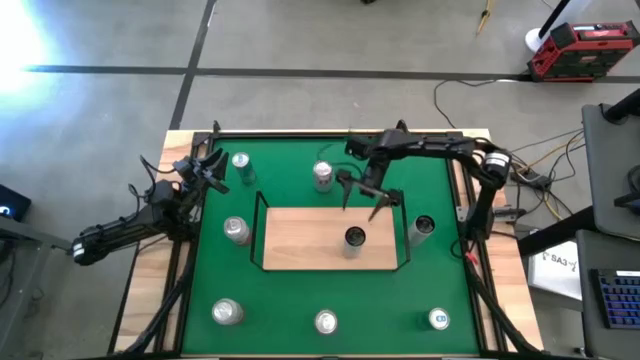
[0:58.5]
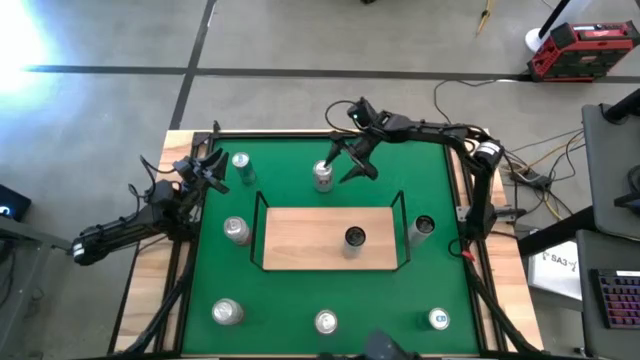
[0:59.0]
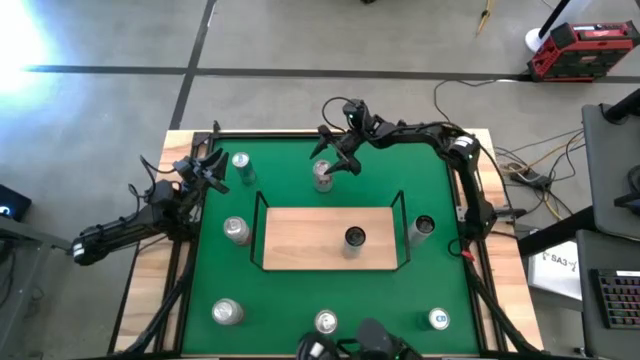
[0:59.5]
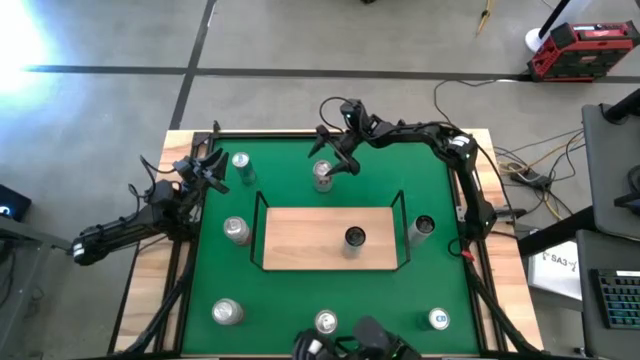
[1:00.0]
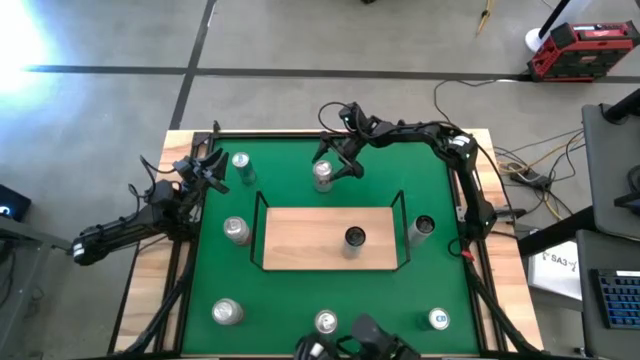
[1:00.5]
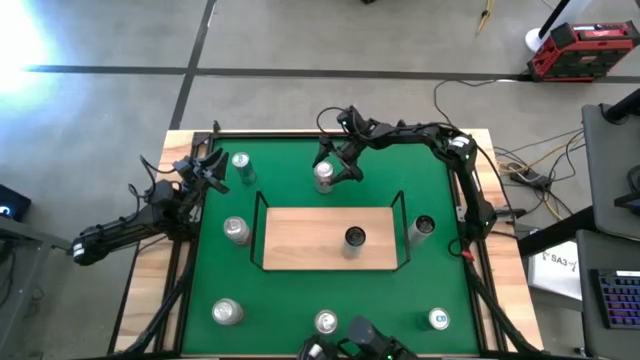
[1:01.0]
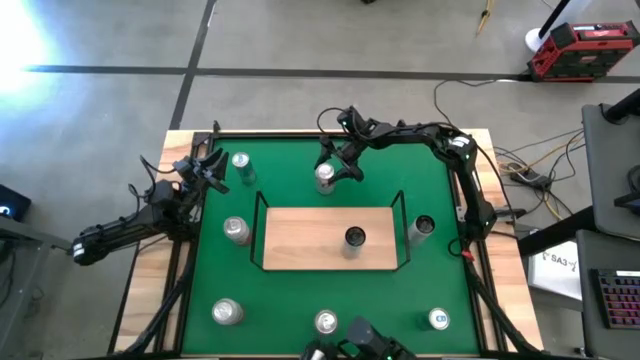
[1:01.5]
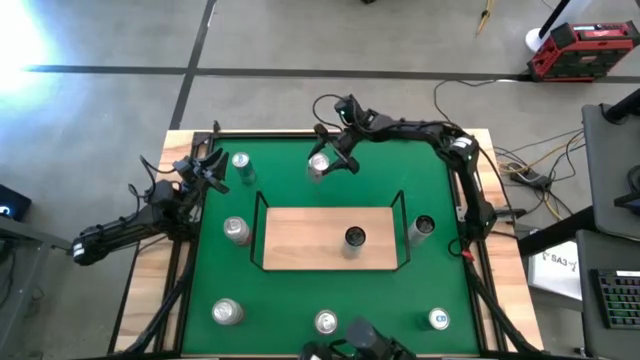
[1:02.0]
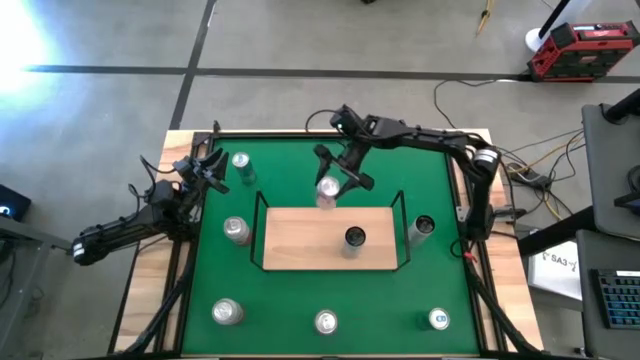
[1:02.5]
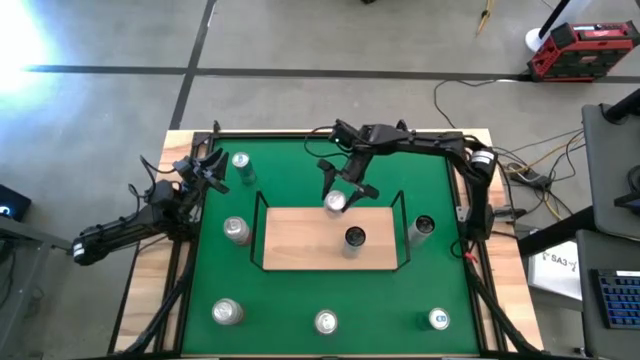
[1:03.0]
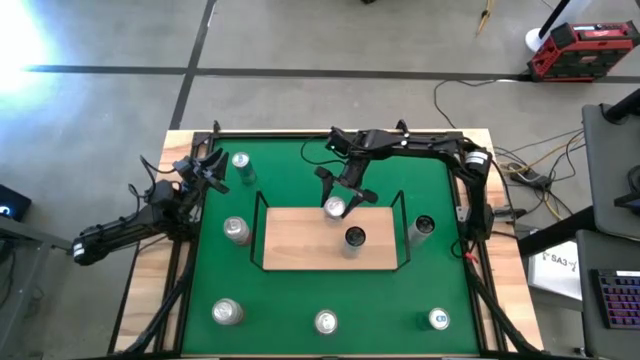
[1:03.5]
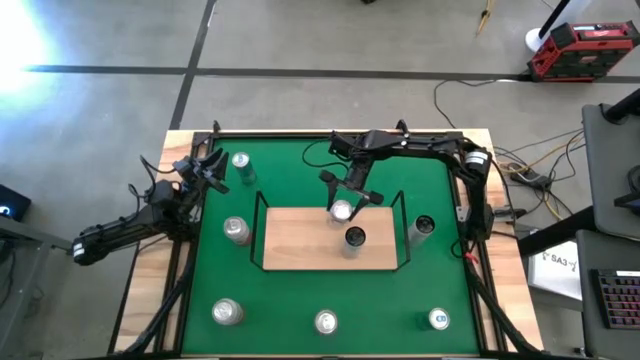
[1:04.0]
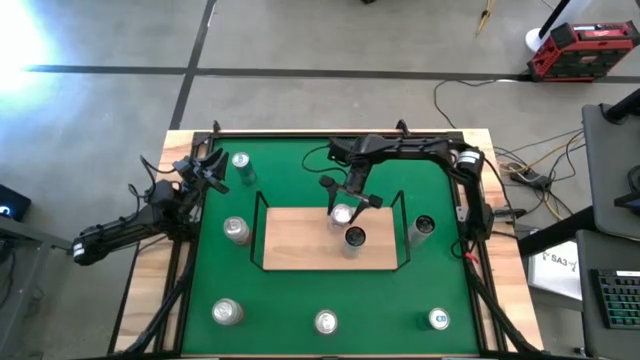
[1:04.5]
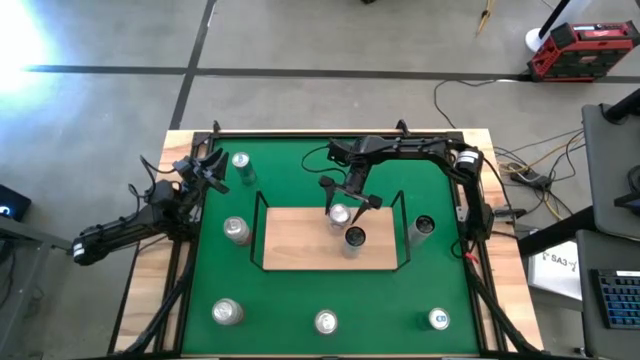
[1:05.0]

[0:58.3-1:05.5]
Task: Place canned beverage on shelf
Put the top red and silver soda can on the shelf

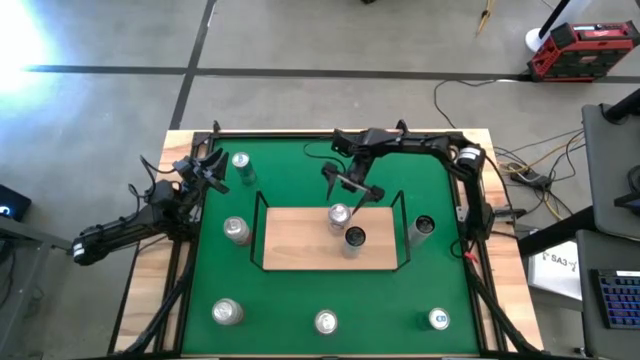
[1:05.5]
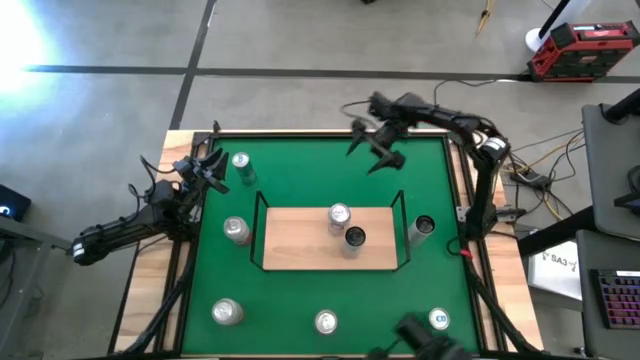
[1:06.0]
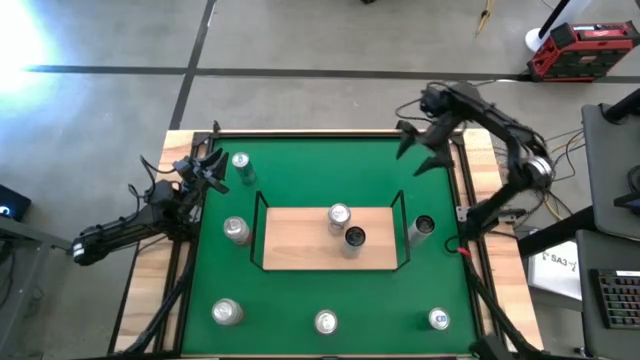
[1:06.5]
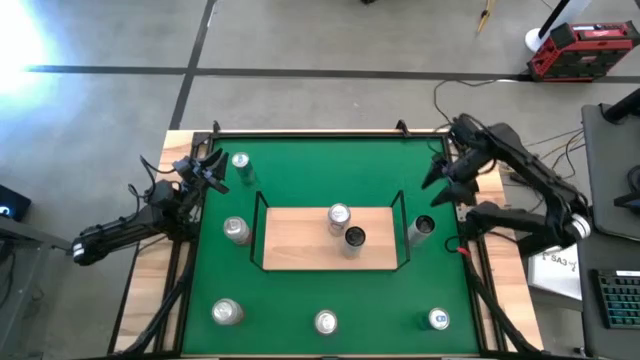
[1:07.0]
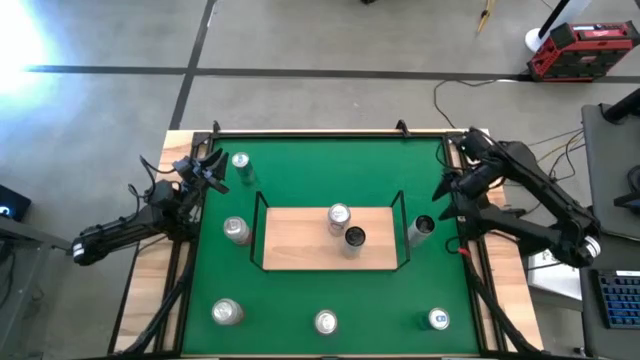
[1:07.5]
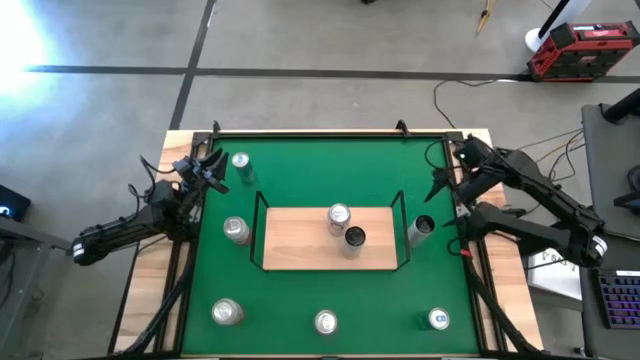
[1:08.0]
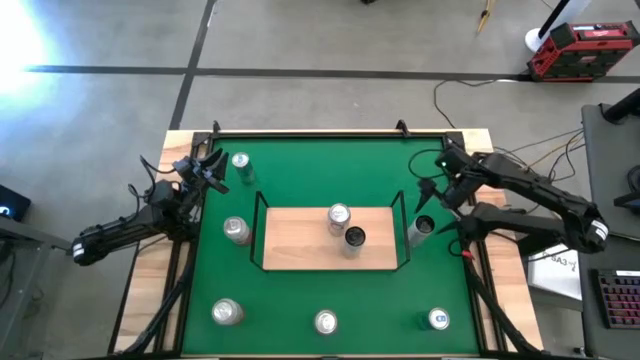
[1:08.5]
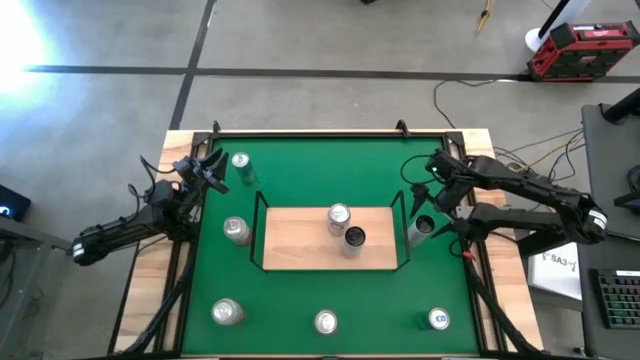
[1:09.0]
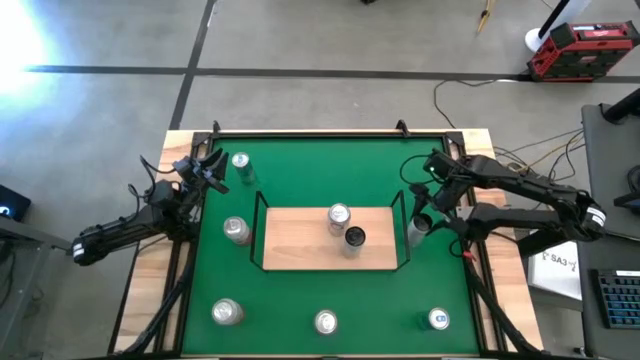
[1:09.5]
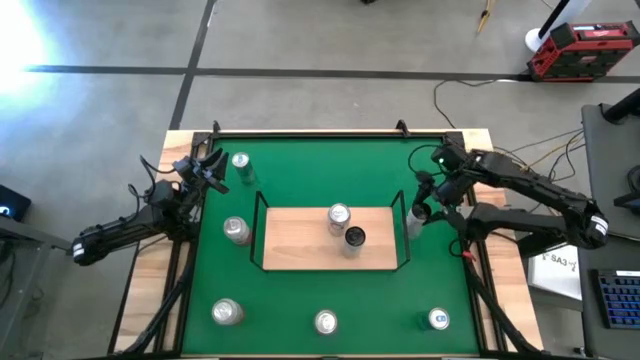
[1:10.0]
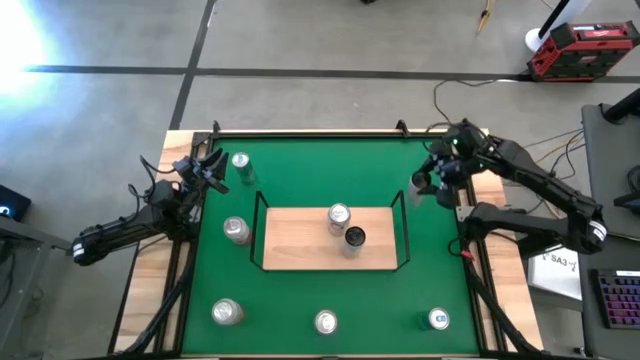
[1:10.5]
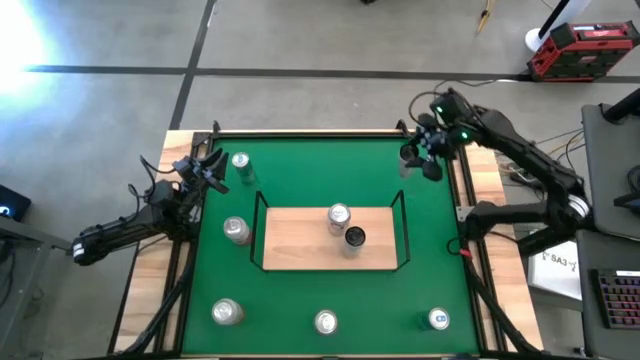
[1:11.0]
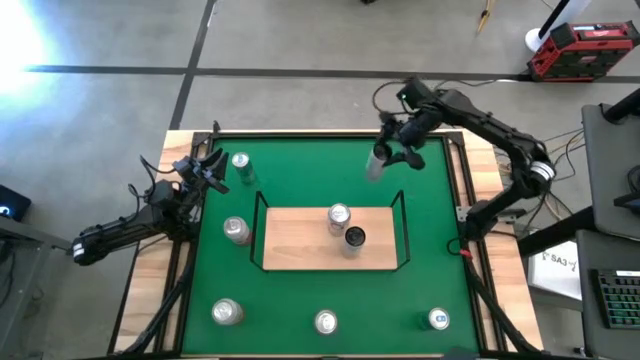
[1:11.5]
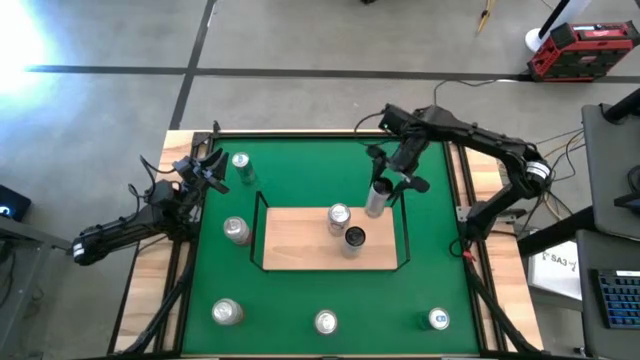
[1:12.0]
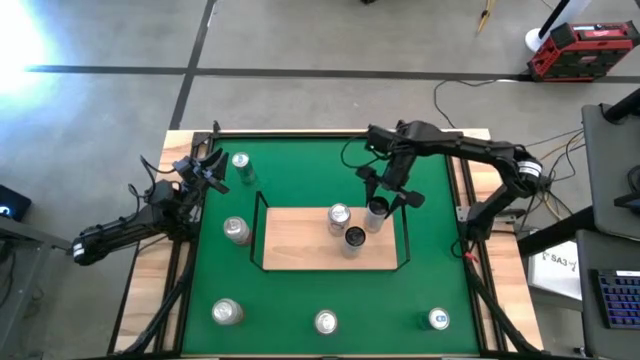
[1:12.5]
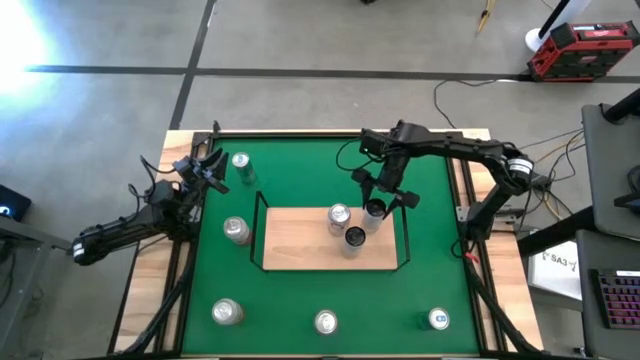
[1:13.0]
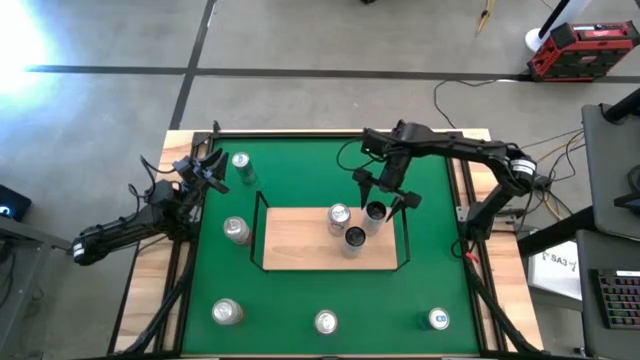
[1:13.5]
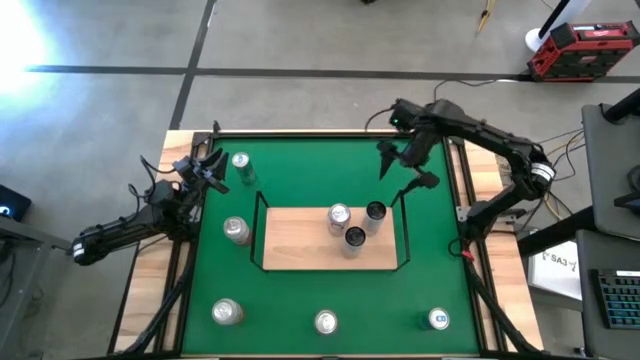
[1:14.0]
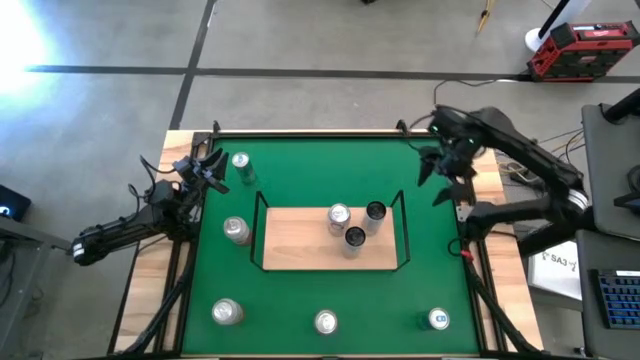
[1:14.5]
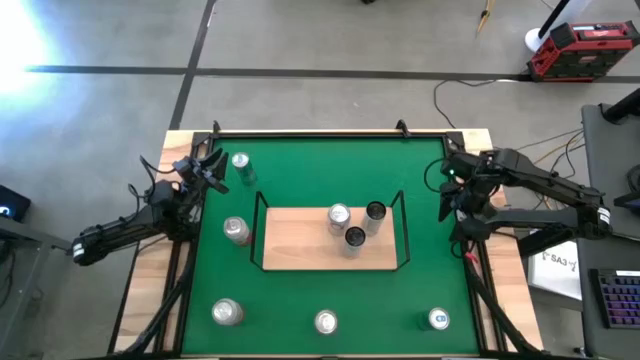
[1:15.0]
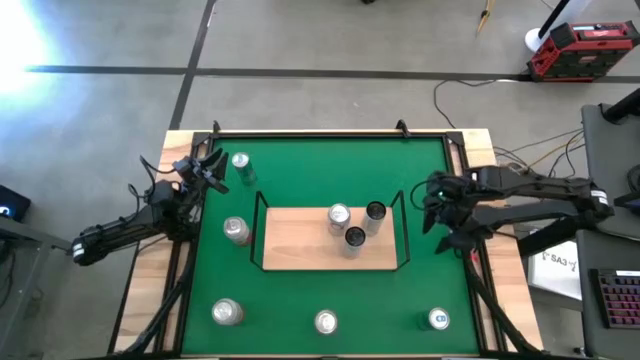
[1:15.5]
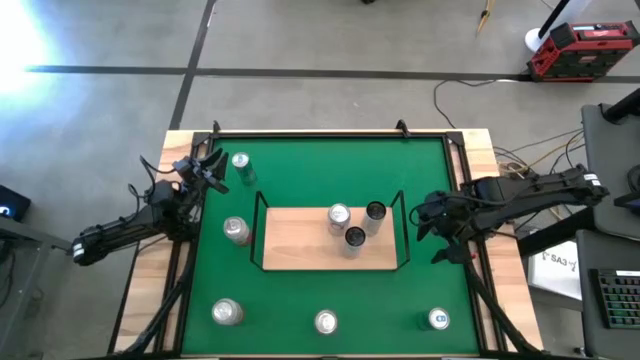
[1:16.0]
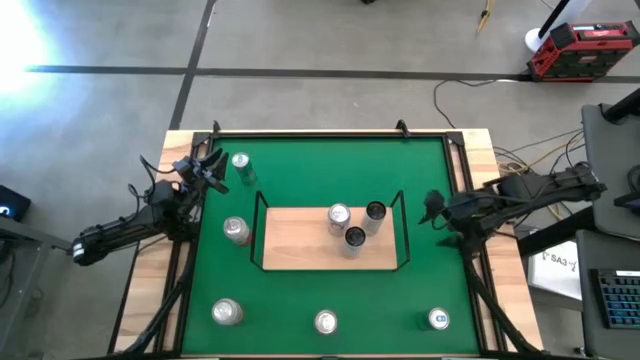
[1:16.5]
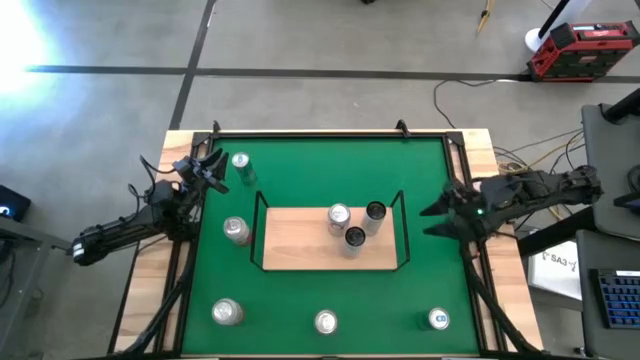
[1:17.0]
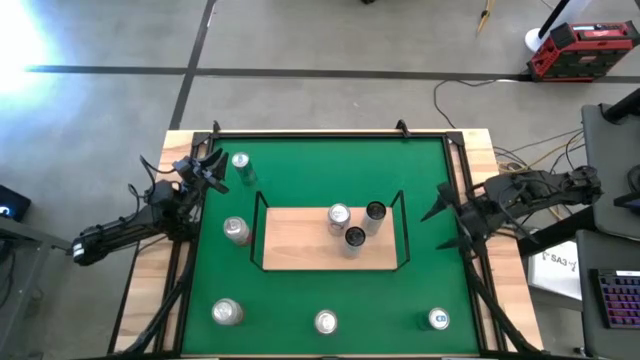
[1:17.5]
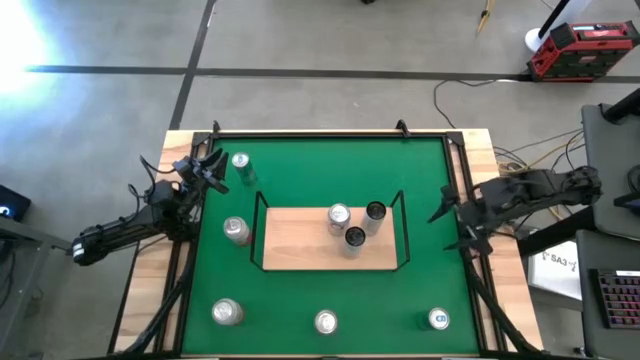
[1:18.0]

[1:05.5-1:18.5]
Put the white-yellow soda can on the shelf

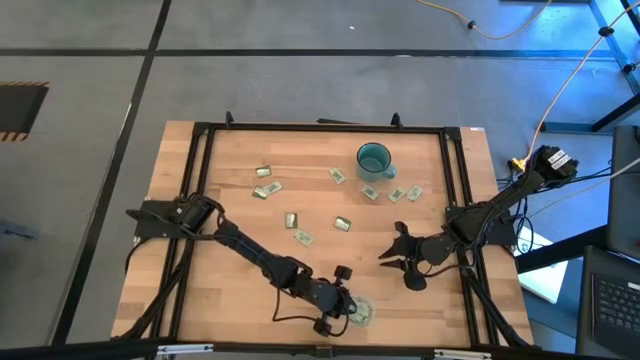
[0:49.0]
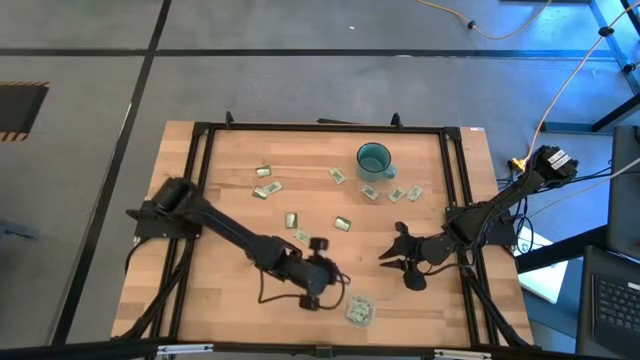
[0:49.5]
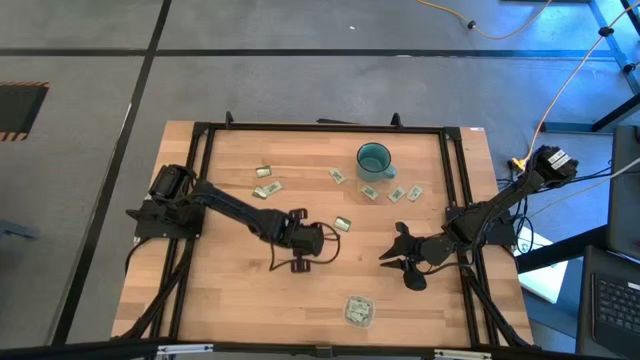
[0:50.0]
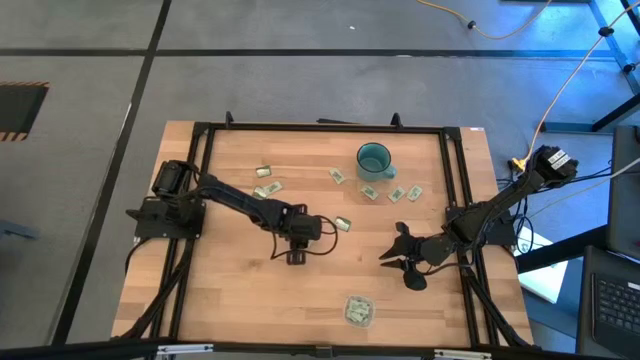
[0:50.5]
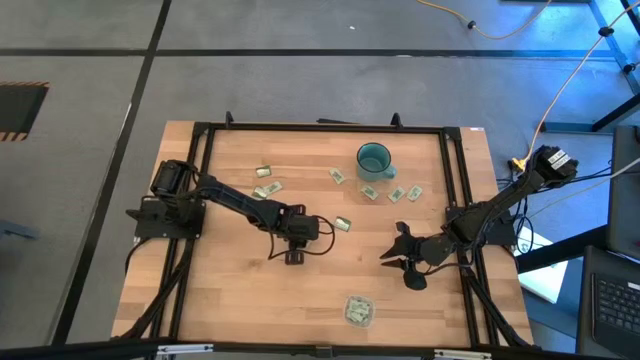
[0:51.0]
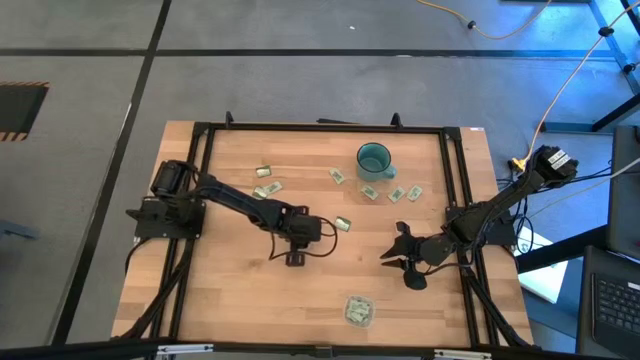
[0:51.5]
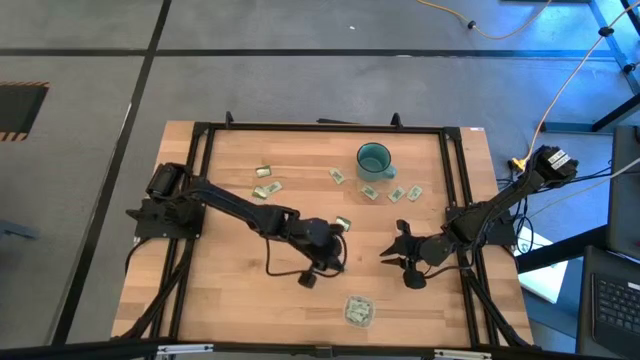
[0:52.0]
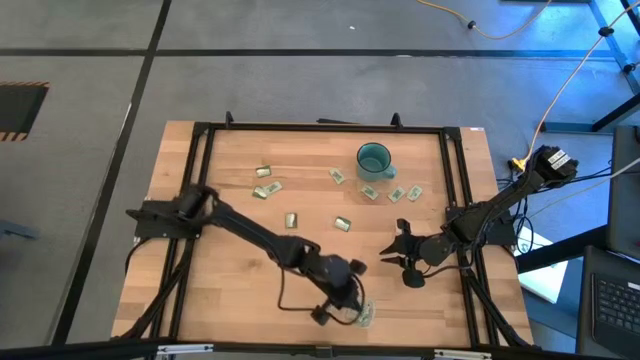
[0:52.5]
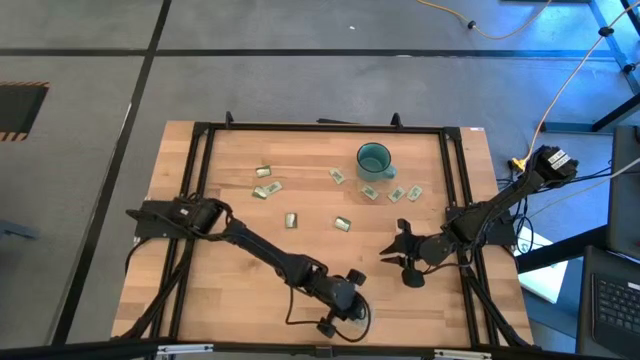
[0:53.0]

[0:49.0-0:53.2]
Task: Pick and place items into bin
Put the light green stevia packet into the transparent bin
